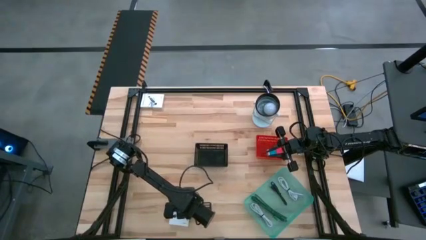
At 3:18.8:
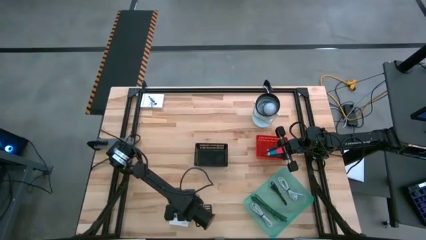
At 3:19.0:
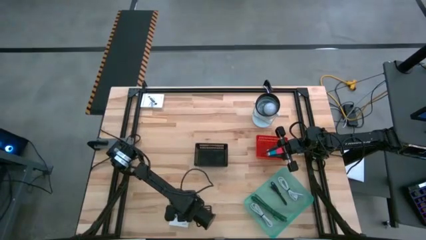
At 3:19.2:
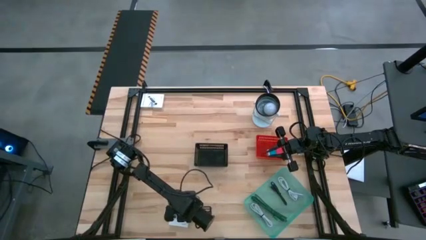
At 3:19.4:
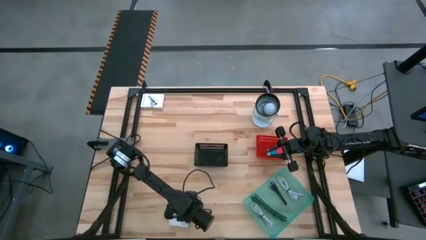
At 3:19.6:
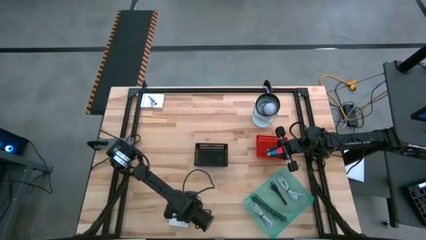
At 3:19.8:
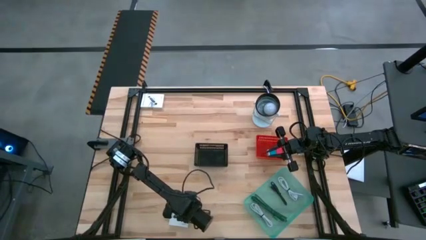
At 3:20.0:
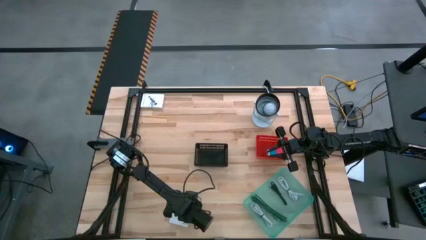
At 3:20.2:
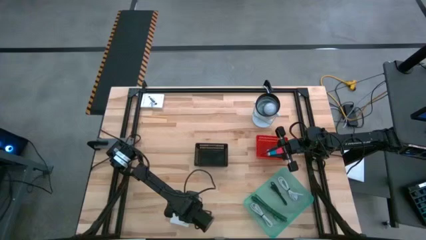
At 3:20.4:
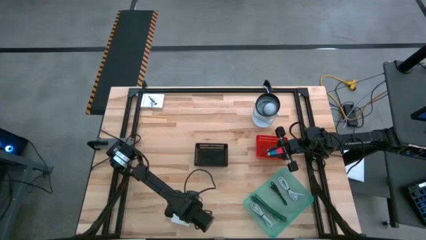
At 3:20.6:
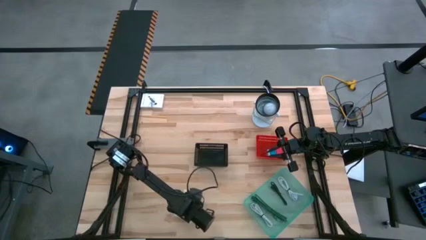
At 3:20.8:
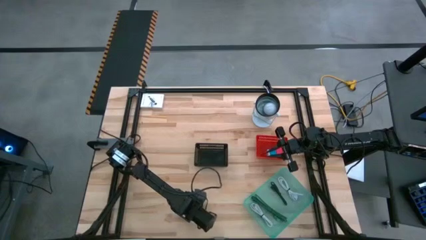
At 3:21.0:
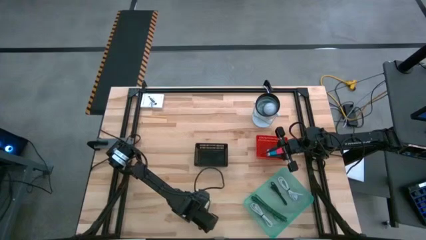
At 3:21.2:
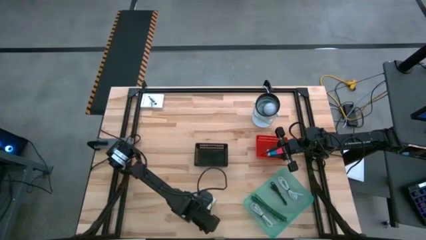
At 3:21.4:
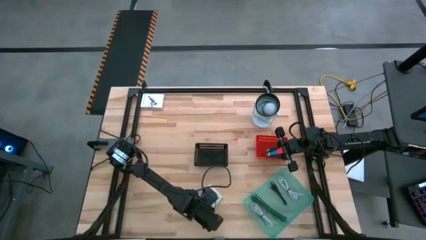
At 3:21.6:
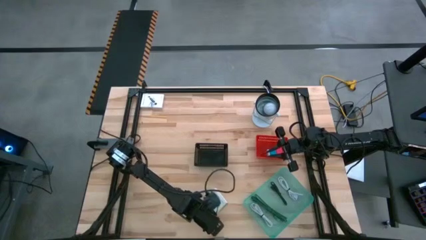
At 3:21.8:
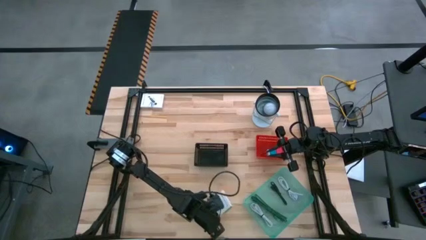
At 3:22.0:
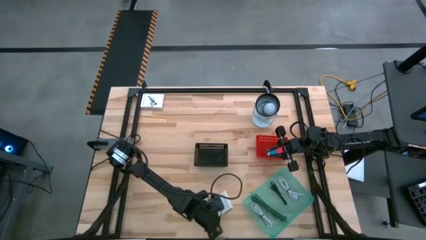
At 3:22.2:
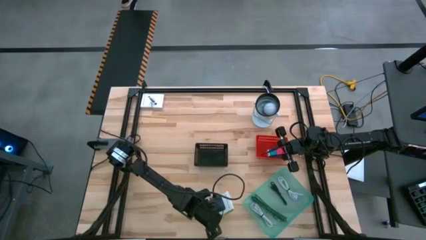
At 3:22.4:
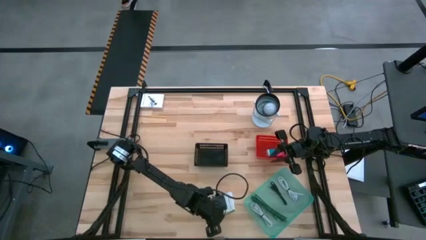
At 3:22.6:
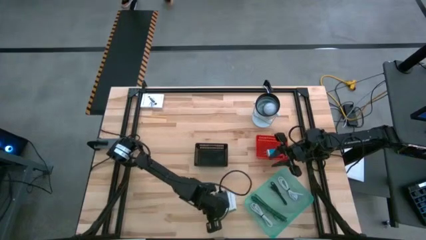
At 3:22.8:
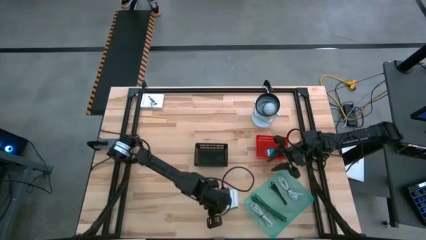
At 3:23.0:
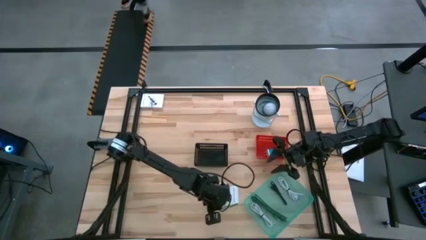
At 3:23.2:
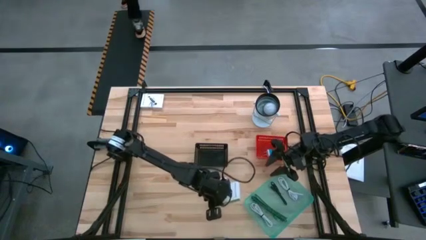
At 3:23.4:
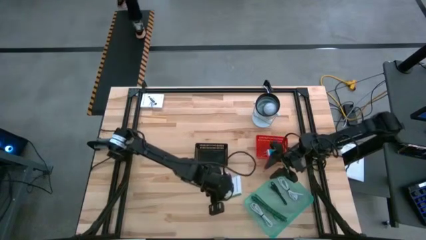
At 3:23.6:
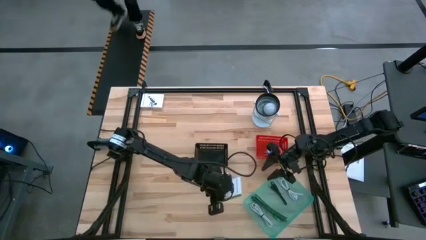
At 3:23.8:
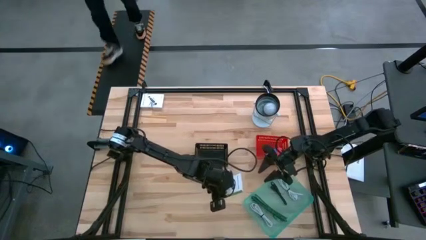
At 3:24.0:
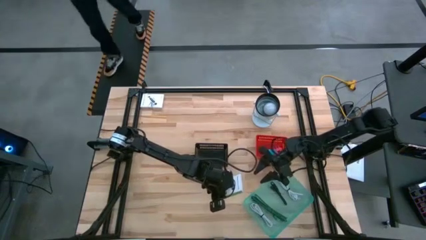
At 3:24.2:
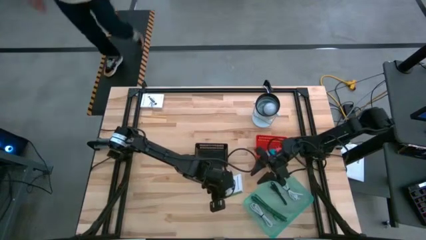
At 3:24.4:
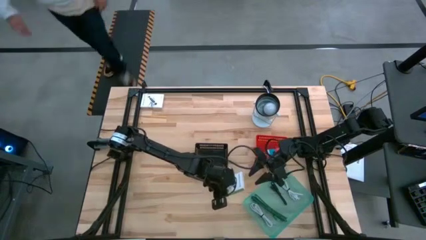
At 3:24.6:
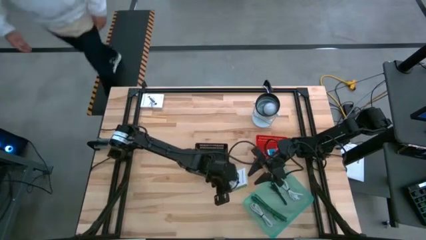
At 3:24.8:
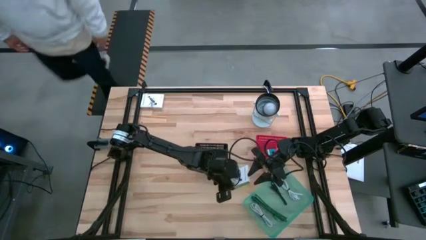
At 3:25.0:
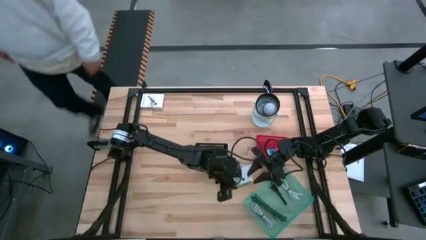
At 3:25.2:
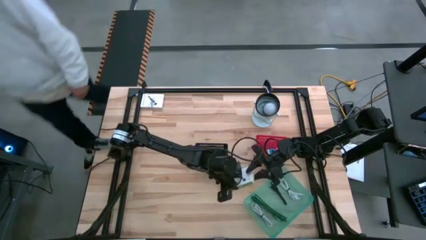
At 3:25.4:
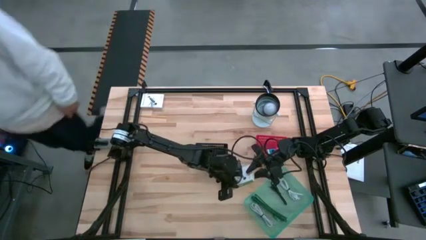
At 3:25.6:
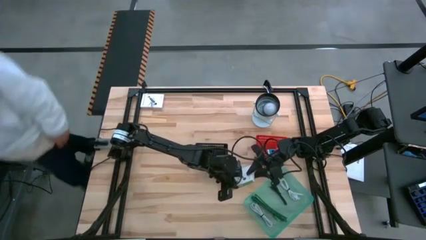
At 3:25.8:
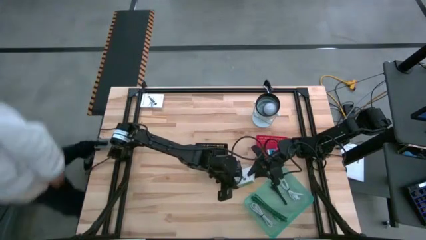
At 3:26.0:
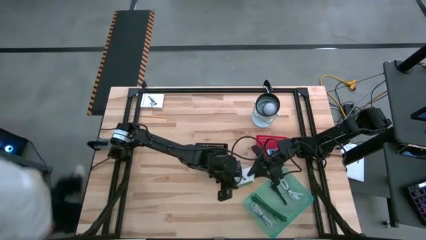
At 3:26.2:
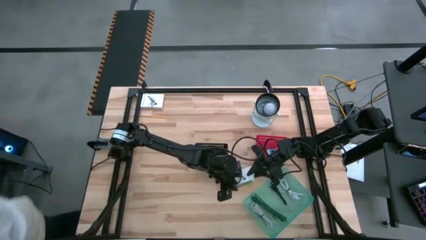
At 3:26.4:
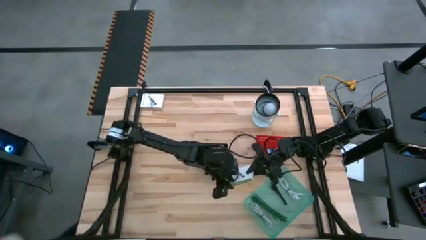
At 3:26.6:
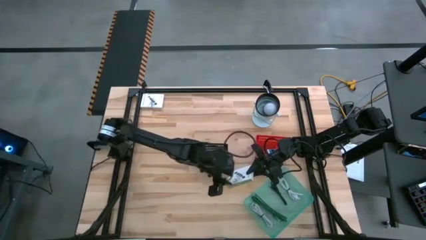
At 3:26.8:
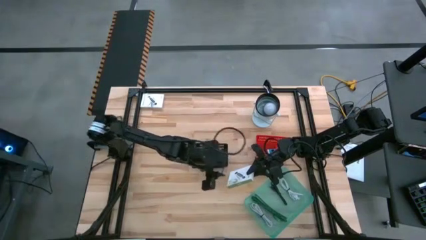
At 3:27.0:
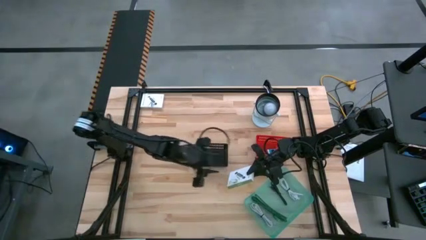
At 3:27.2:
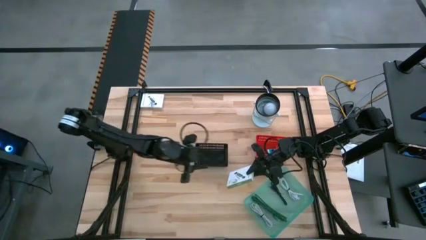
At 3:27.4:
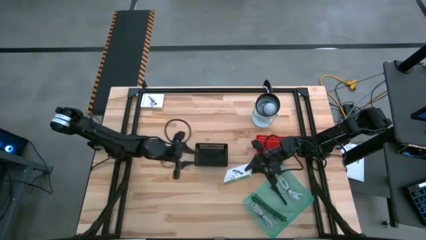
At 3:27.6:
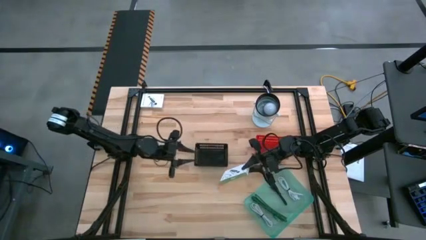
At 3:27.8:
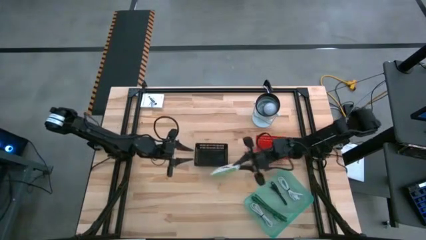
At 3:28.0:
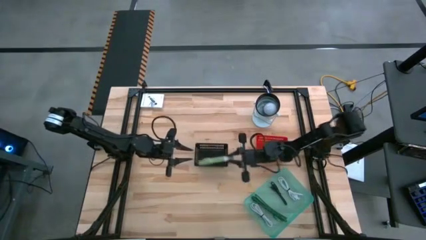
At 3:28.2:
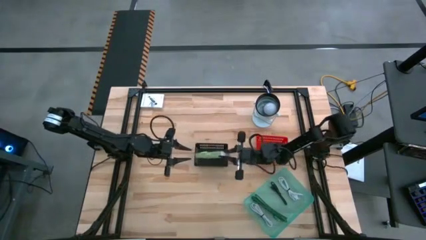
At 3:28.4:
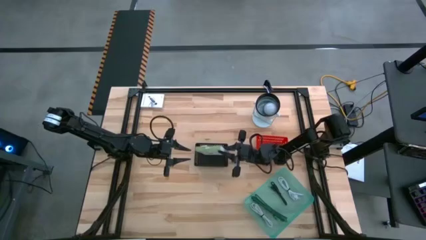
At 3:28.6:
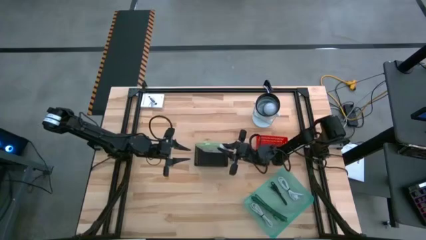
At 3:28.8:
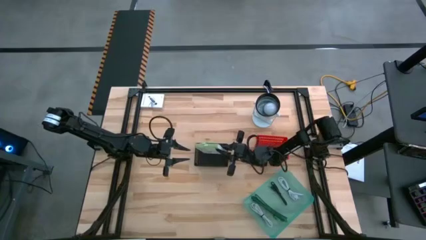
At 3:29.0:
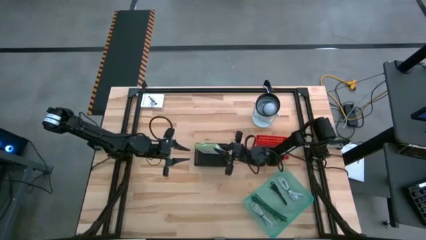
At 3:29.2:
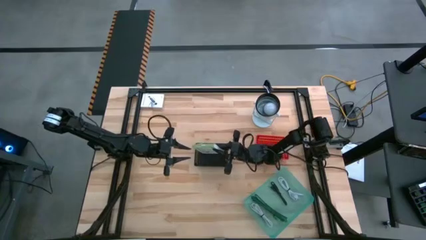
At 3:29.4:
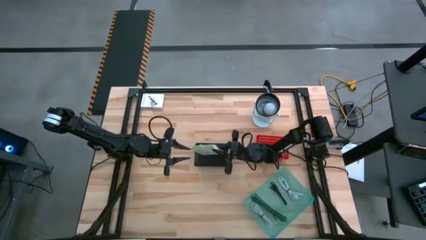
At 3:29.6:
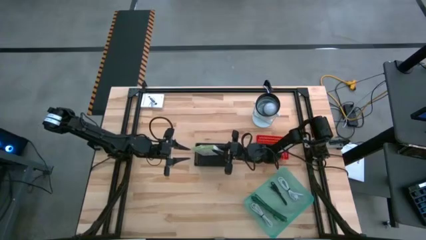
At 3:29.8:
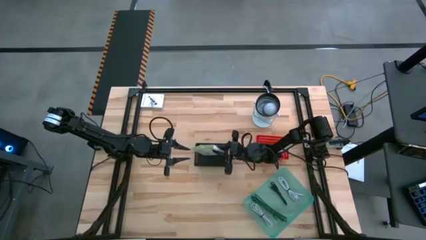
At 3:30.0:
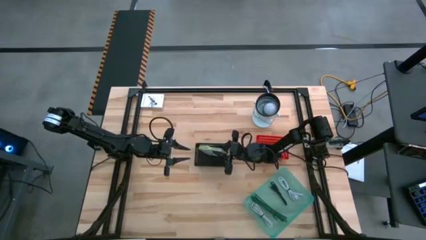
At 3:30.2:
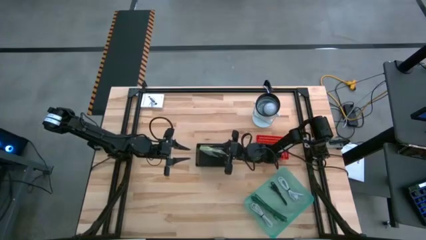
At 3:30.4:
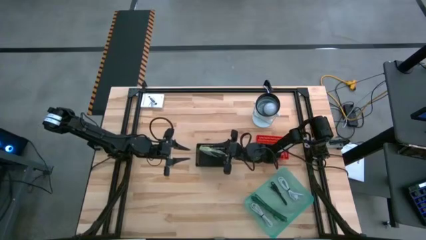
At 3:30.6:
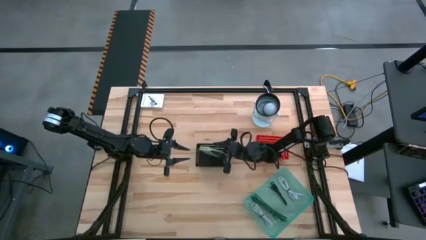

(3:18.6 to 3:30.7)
Task: Pick and place items into bin
Put the bottom white card reader box into the black bin

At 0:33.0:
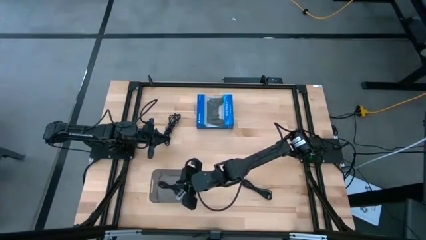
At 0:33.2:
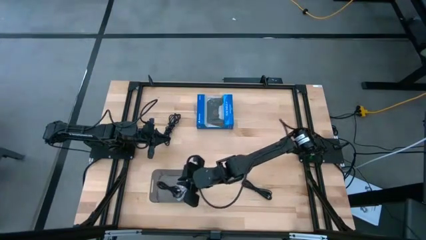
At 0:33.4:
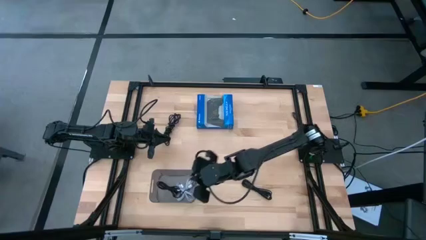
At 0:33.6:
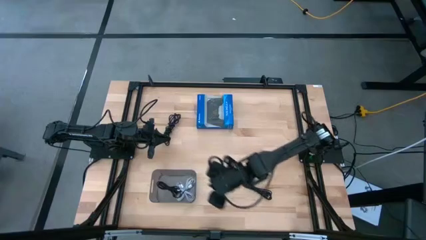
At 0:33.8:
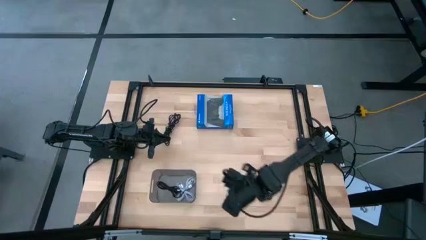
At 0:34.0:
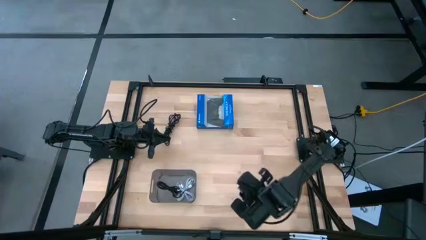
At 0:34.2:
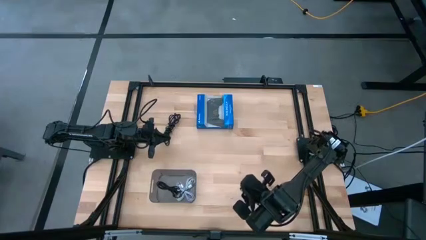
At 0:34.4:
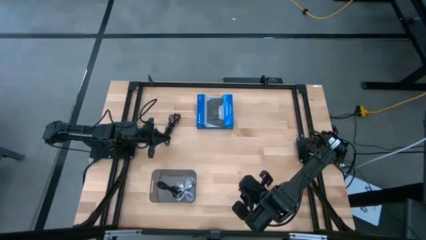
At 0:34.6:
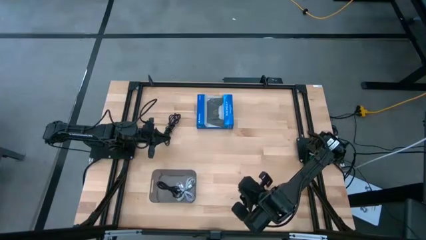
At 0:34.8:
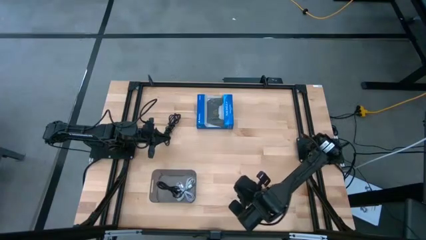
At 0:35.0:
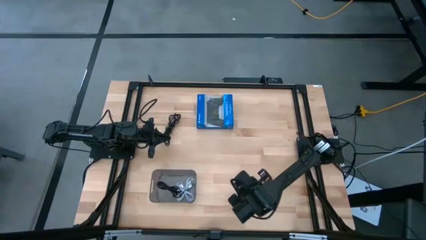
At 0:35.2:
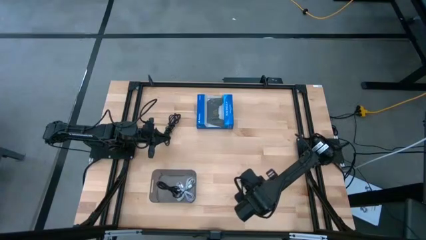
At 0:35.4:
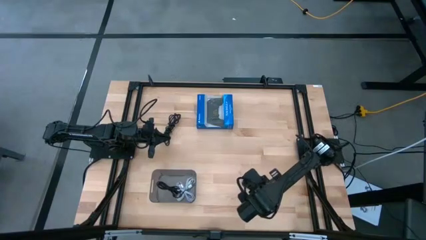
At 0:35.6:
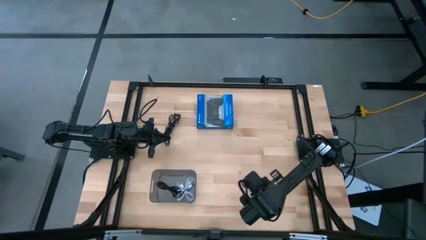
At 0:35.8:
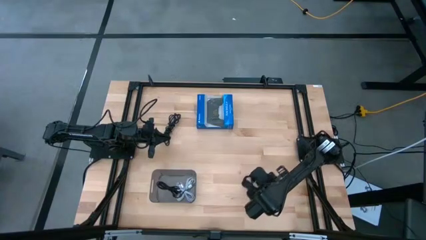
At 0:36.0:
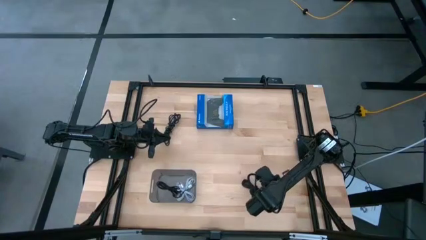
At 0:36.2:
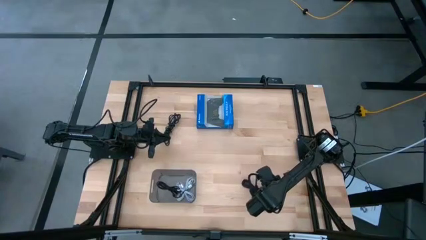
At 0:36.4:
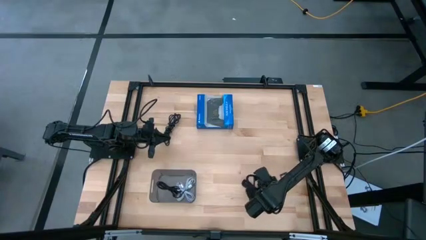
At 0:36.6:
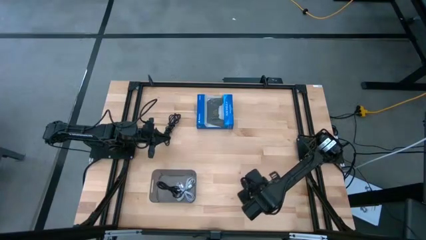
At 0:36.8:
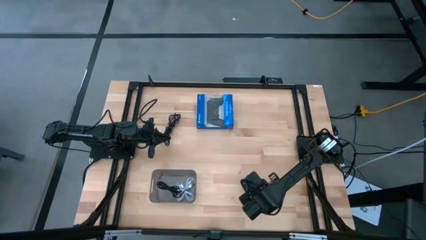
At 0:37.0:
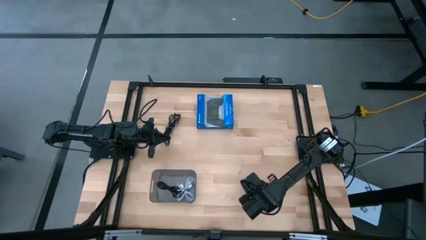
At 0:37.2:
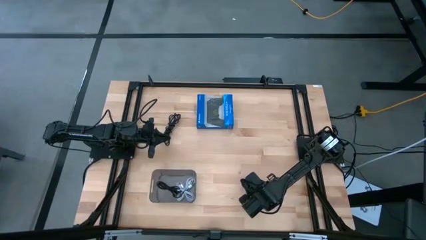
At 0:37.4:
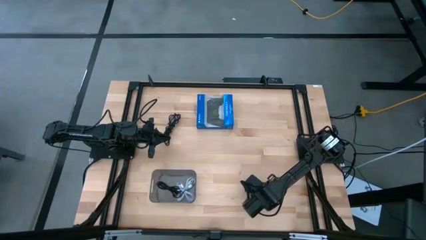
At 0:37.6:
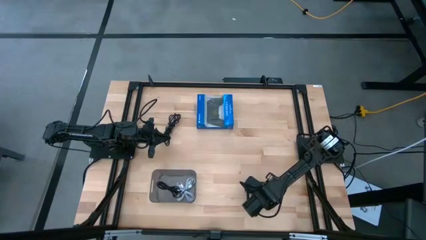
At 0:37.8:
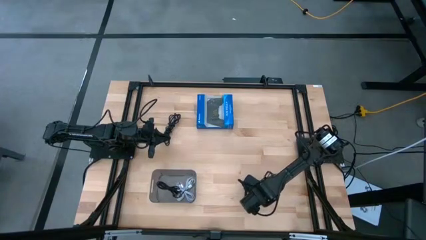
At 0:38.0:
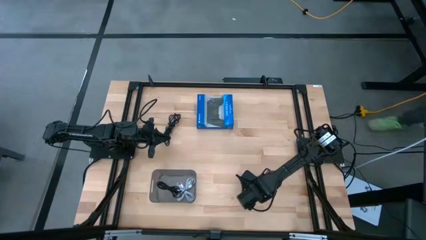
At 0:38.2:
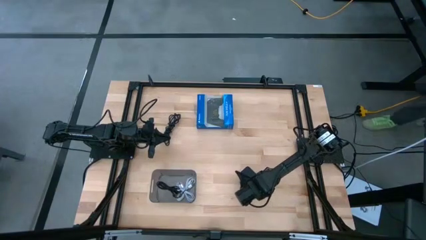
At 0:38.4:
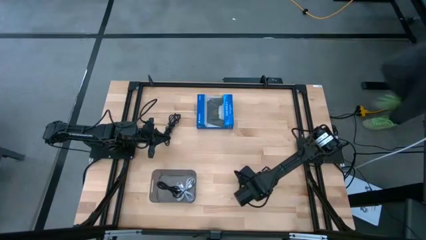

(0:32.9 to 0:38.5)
Task: Pick and place USB-C Cables
Put the right black charger cable into the black bin
